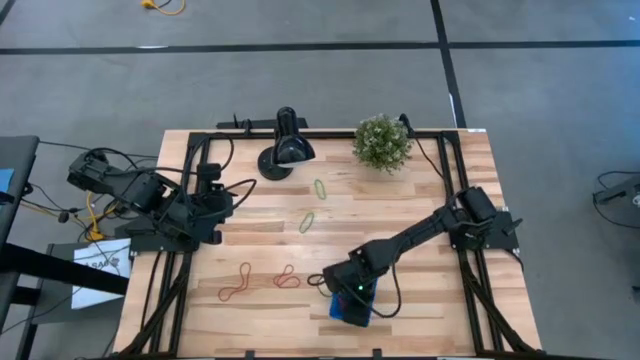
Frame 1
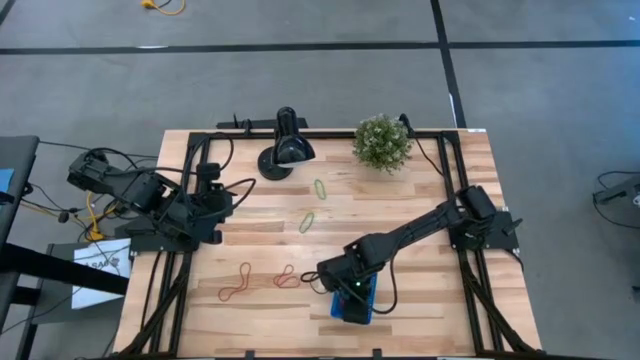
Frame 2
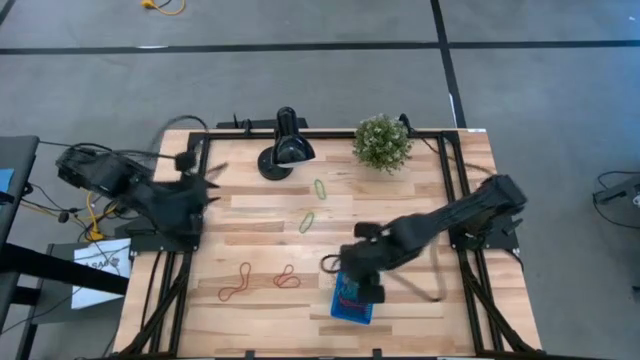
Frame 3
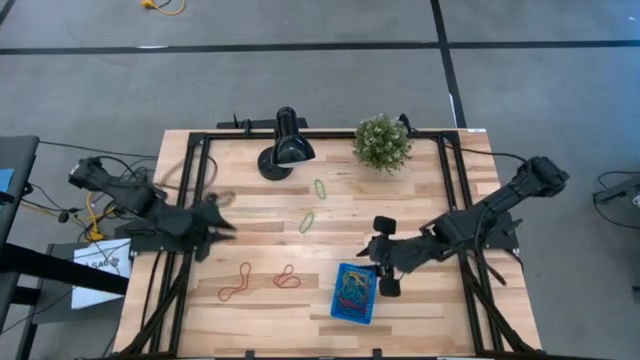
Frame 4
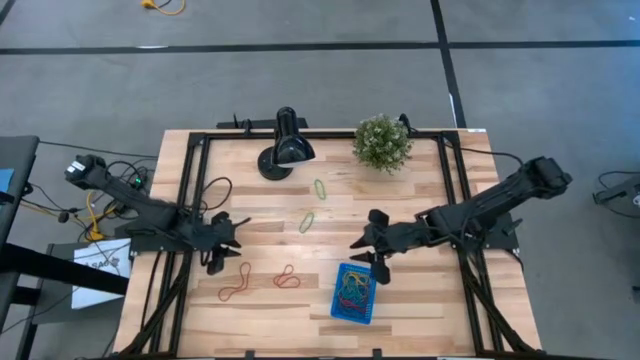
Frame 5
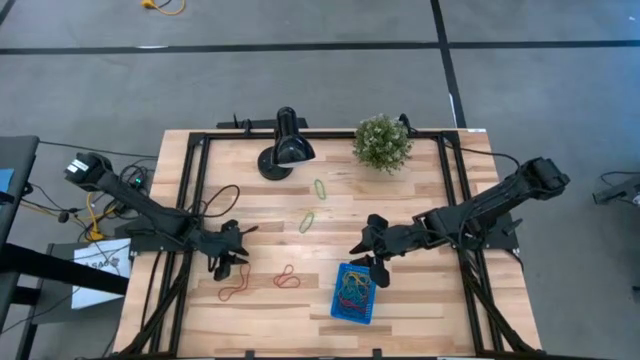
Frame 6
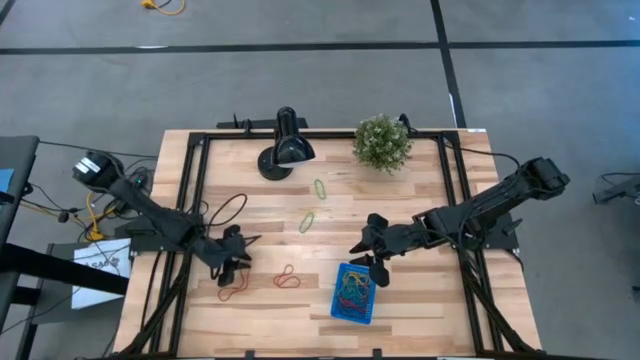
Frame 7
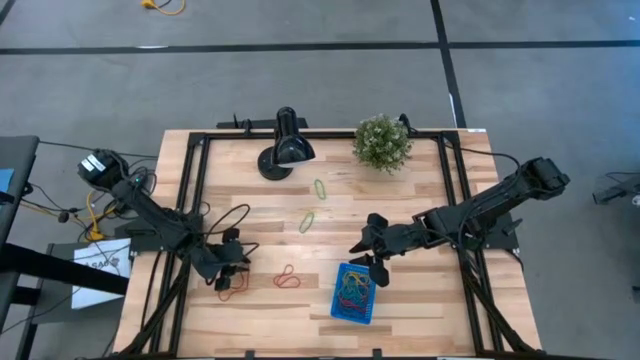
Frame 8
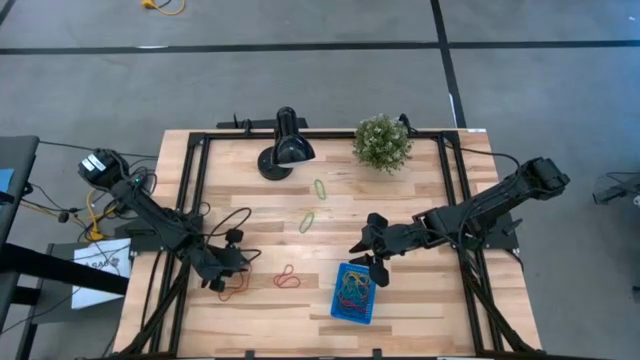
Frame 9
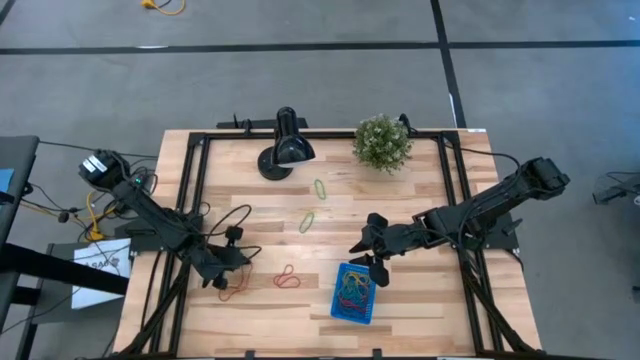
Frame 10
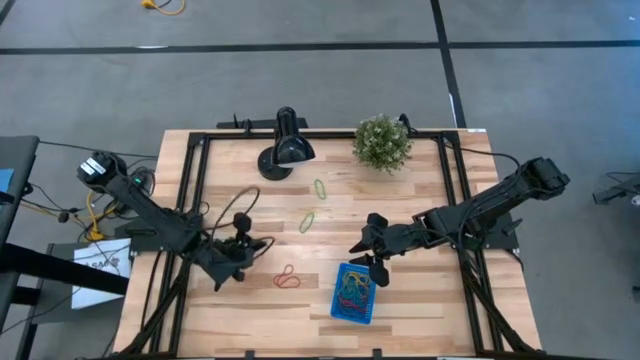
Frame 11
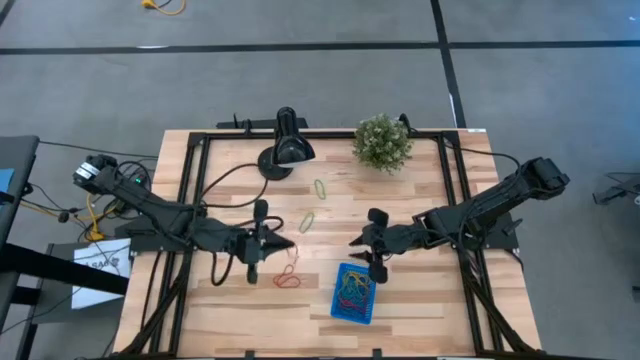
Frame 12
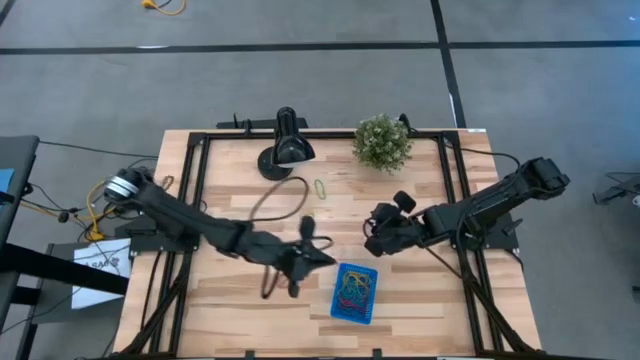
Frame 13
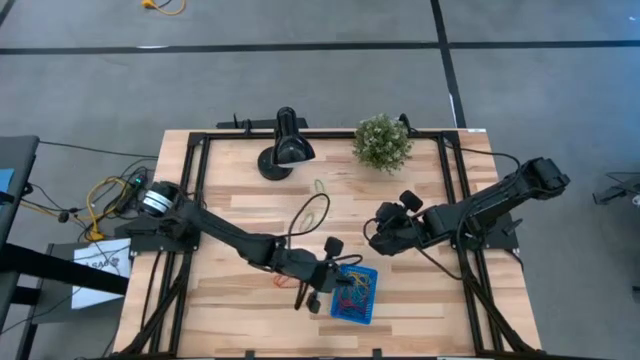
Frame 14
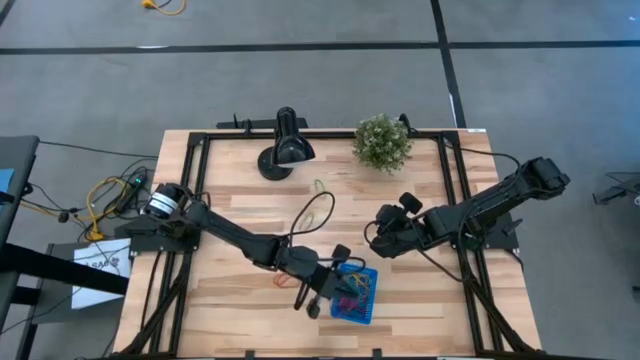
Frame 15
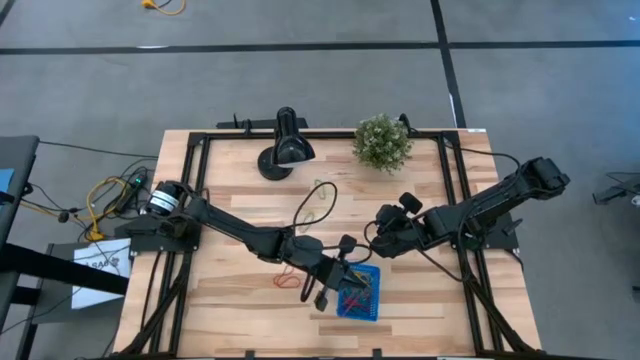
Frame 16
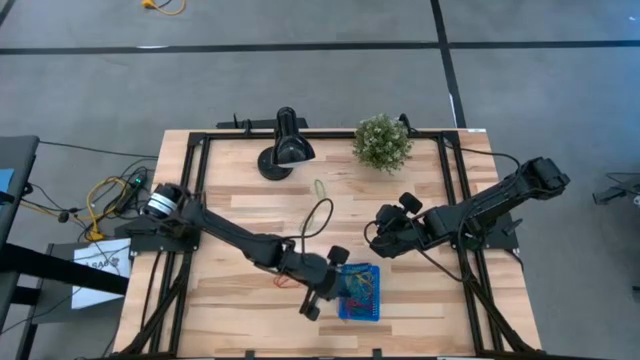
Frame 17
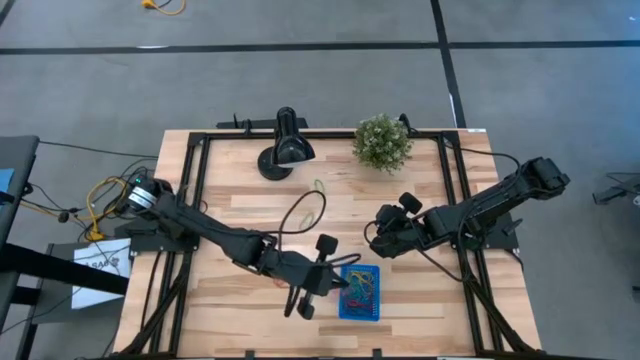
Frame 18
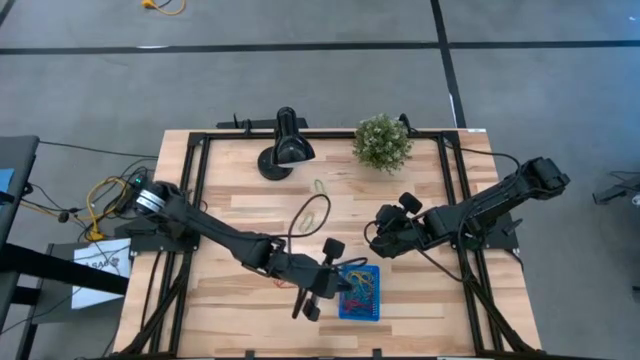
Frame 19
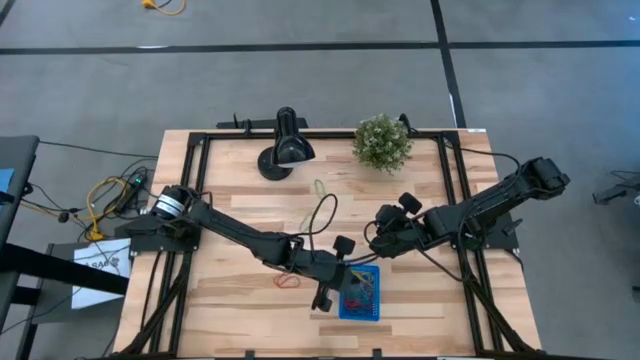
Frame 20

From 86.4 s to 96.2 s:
Task: Pick and place items into bin
Put the red rubber band into the blue bin

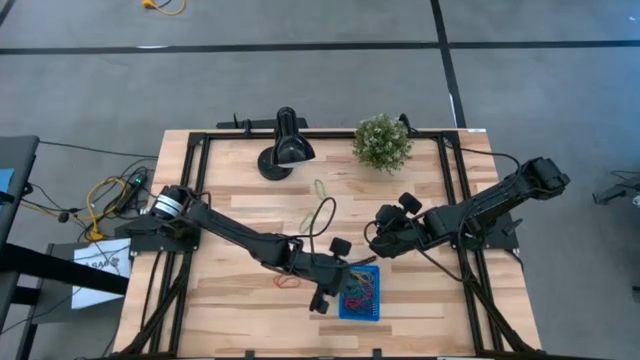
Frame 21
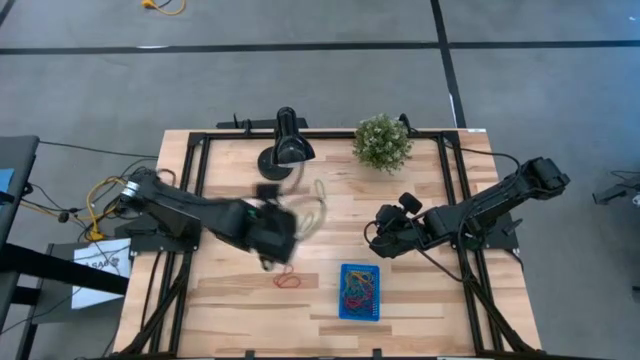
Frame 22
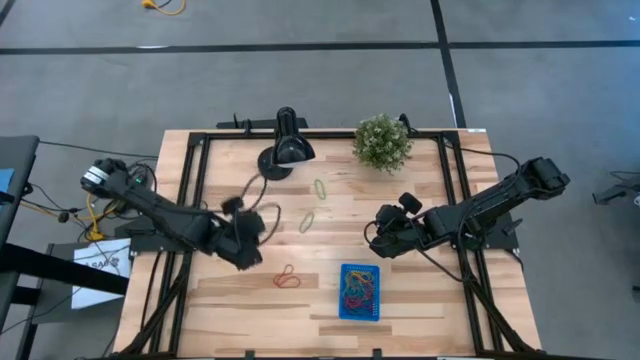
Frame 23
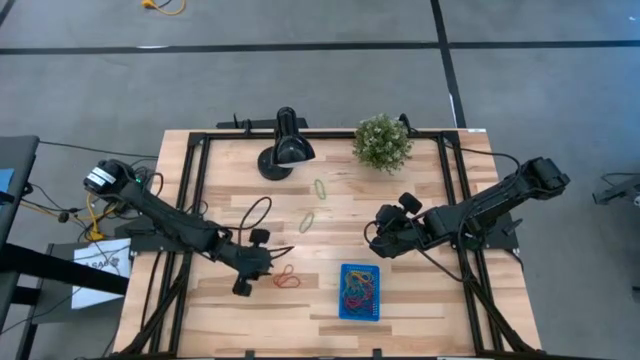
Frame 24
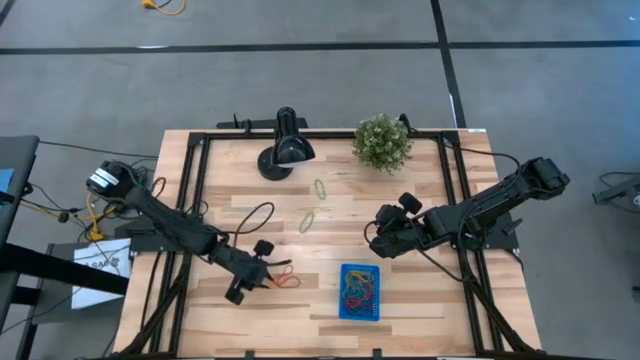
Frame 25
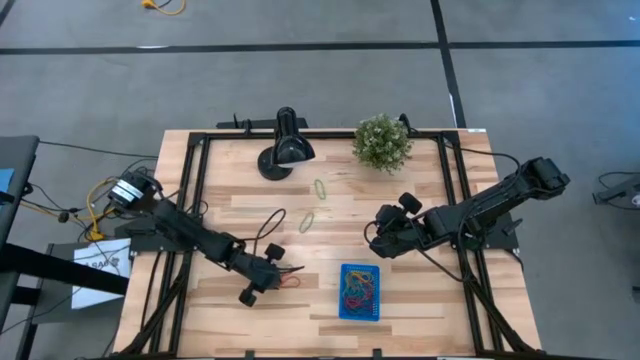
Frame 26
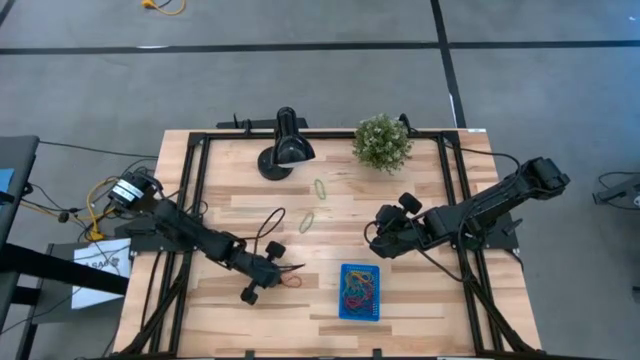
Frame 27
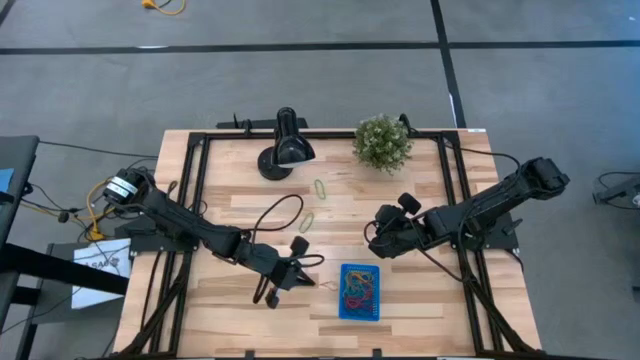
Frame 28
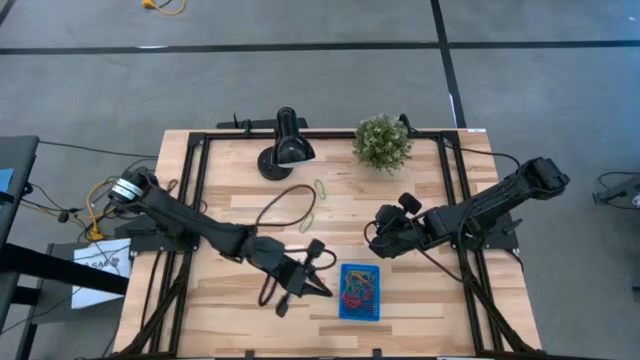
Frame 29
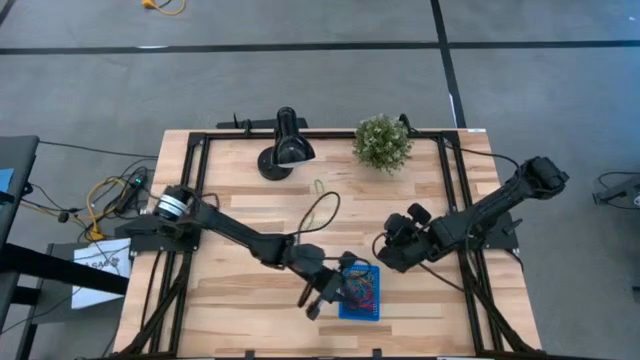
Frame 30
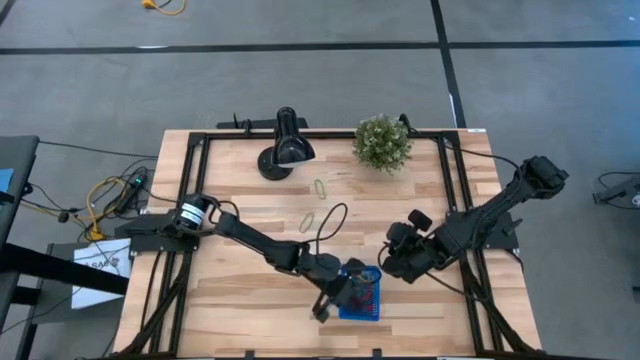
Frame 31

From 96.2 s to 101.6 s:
Put the red rubber band into the blue bin

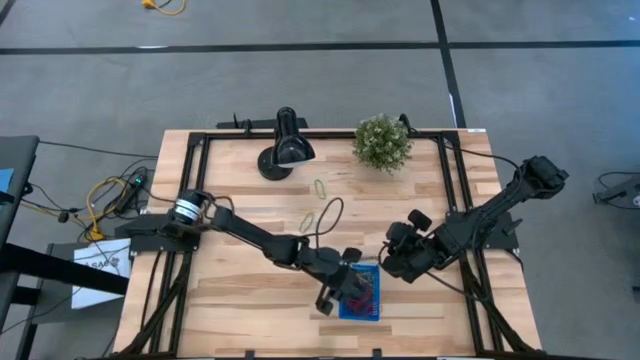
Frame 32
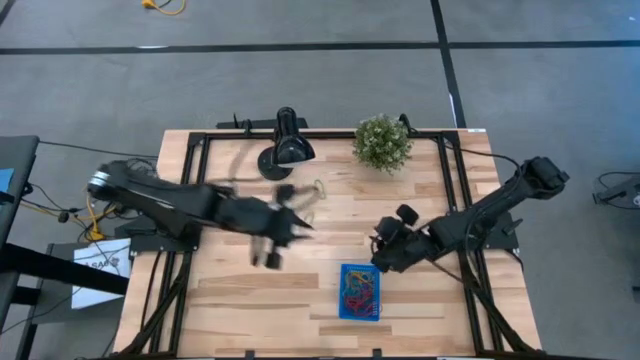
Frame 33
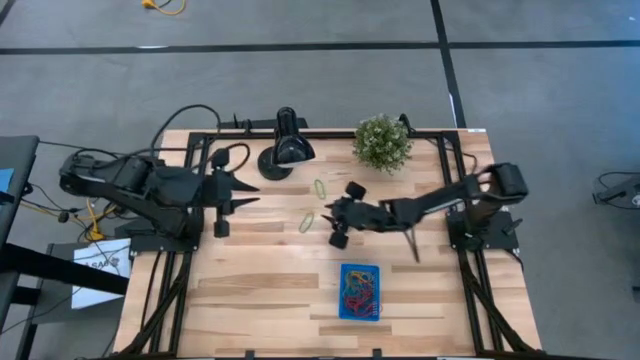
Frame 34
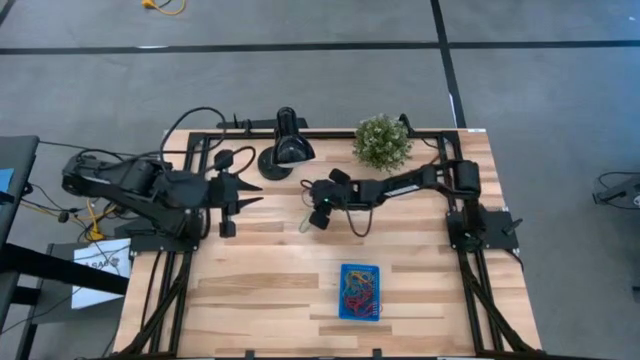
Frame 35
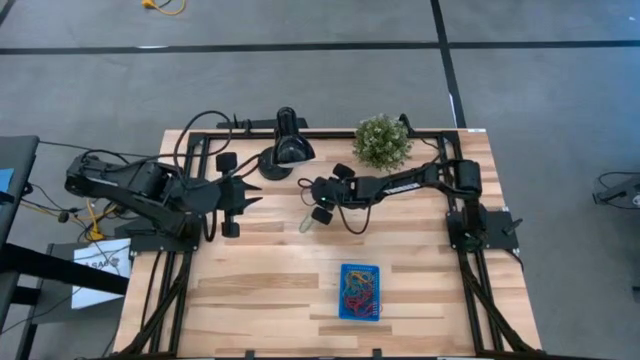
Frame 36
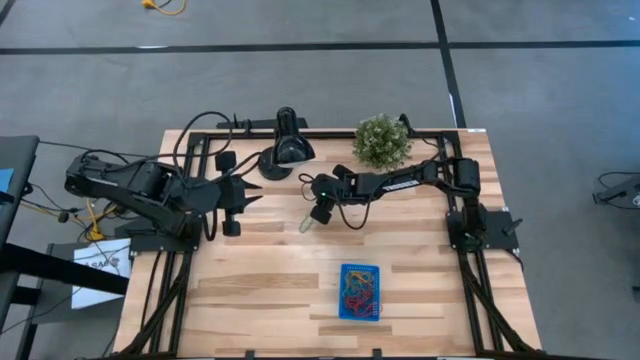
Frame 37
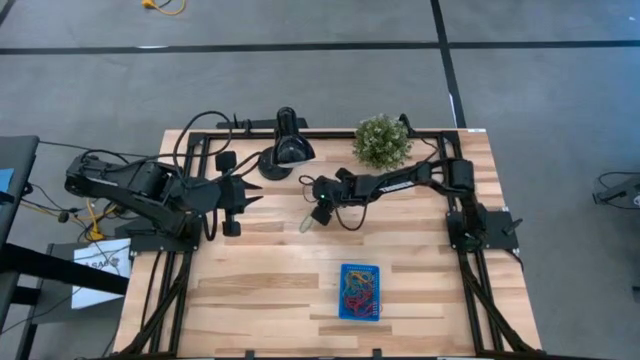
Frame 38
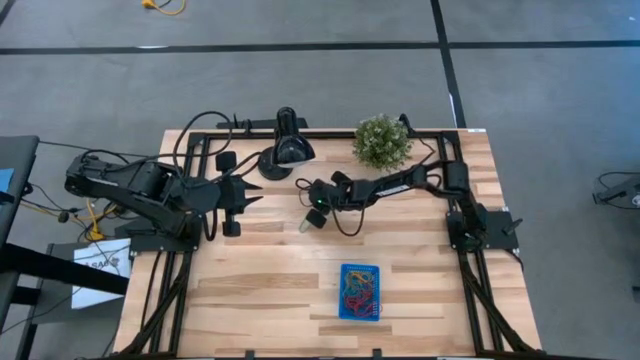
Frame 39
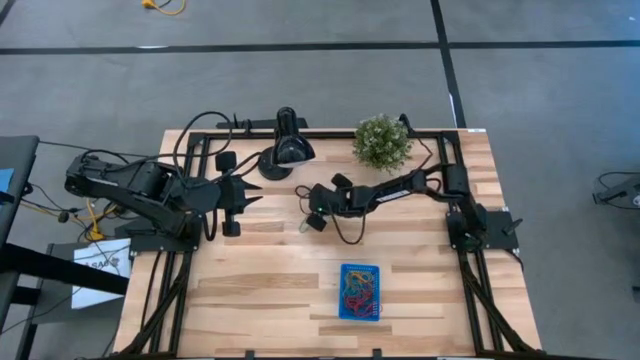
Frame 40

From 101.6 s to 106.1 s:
Put the green rubber band into the blue bin

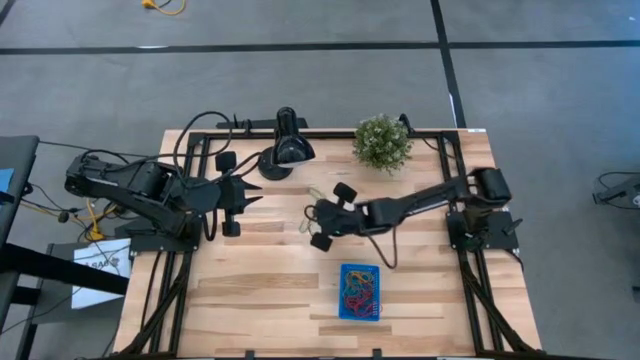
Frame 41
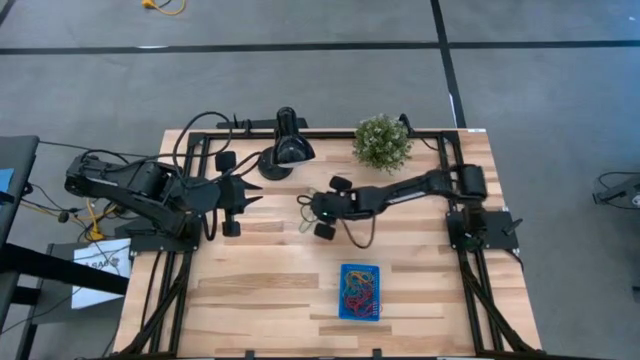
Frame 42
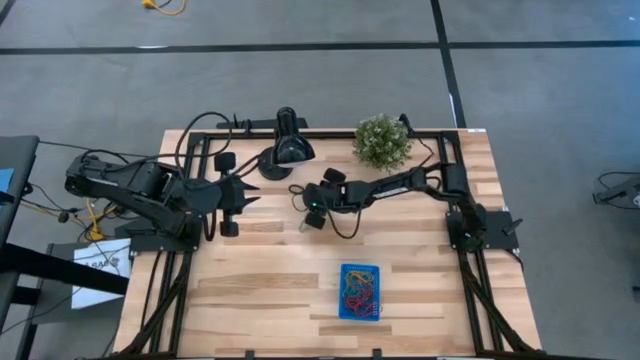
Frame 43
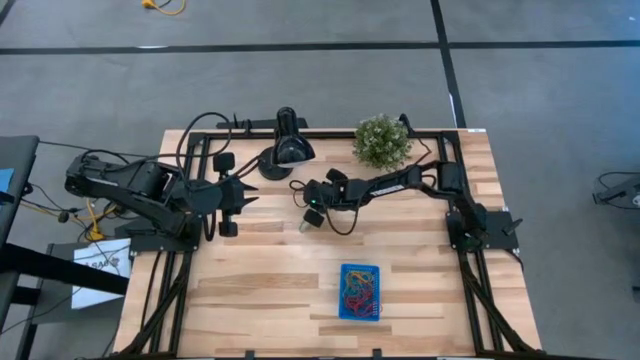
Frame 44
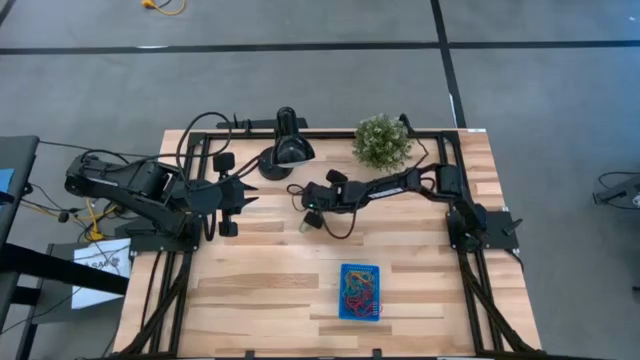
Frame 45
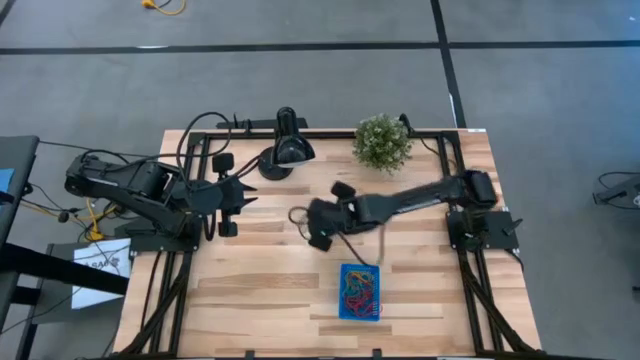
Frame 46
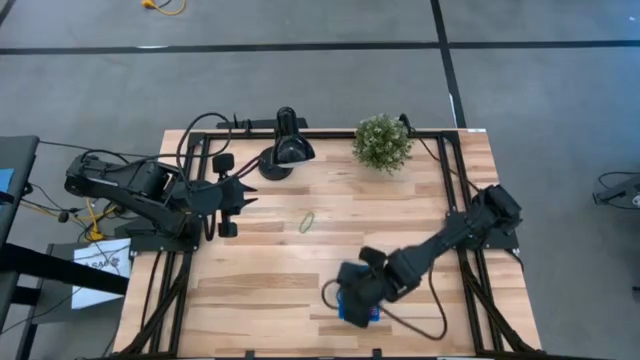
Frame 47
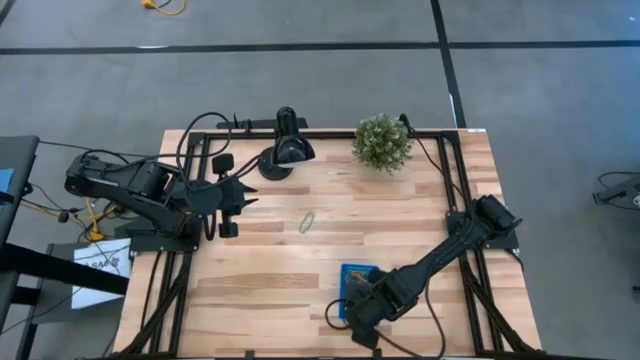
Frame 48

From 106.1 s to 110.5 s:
Put the green rubber band into the blue bin
